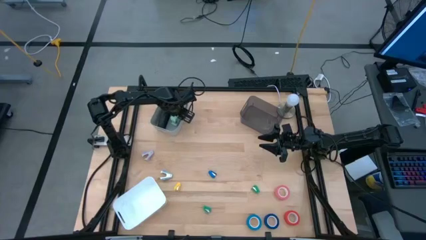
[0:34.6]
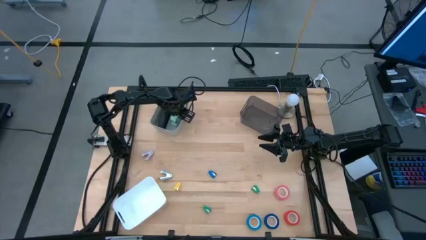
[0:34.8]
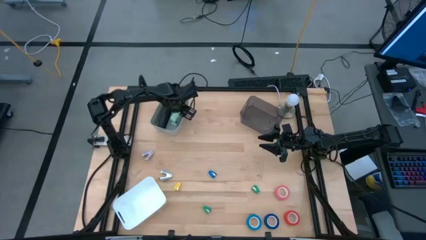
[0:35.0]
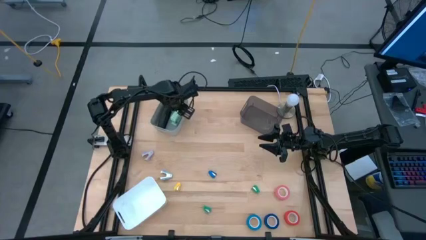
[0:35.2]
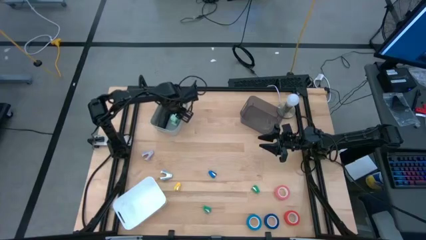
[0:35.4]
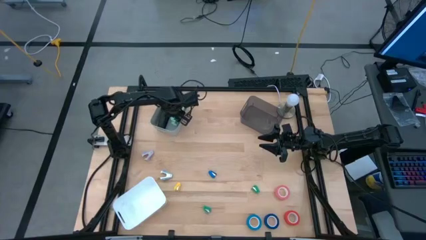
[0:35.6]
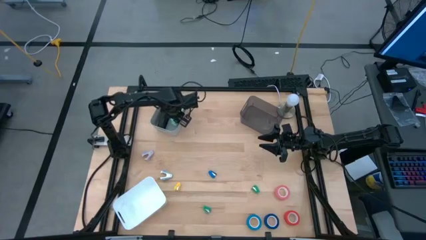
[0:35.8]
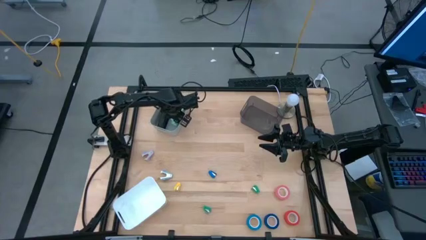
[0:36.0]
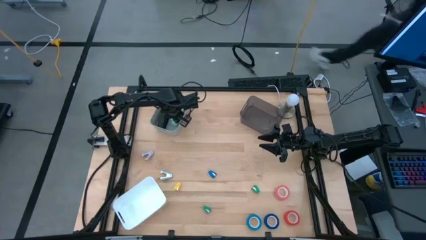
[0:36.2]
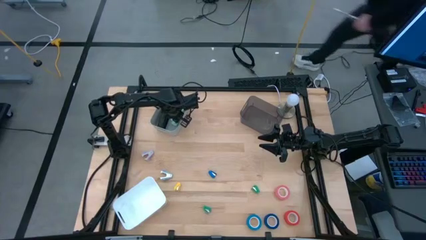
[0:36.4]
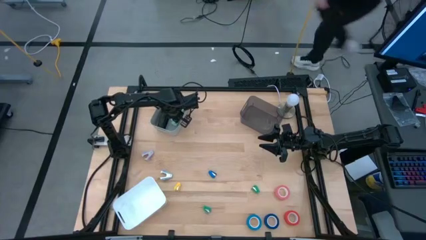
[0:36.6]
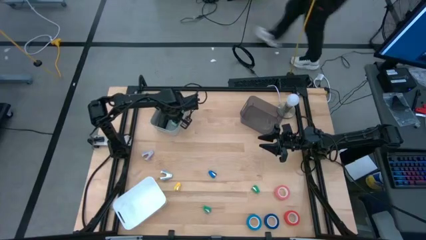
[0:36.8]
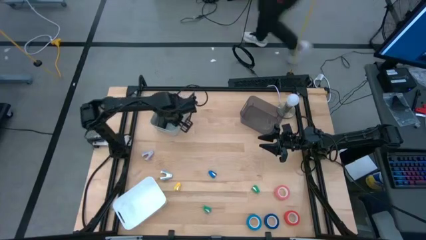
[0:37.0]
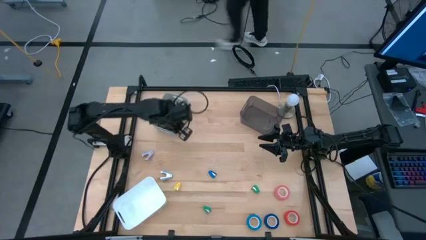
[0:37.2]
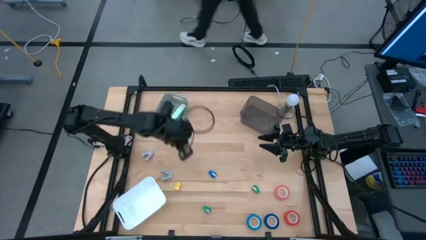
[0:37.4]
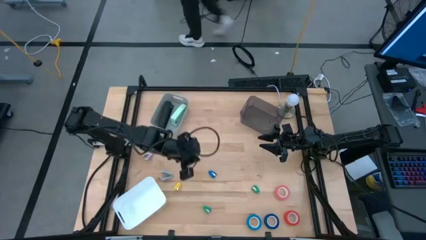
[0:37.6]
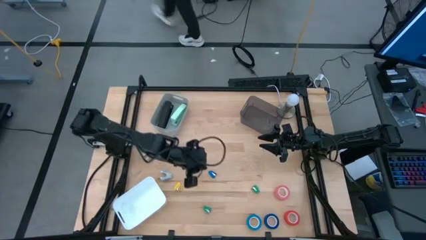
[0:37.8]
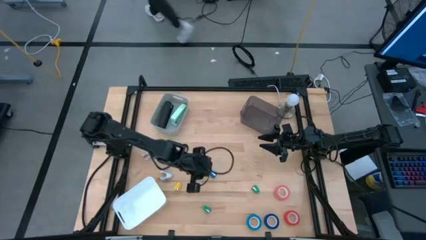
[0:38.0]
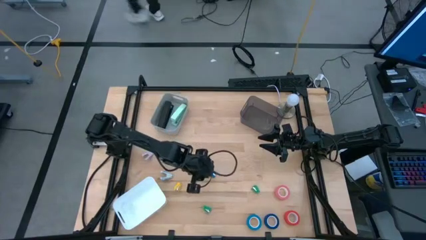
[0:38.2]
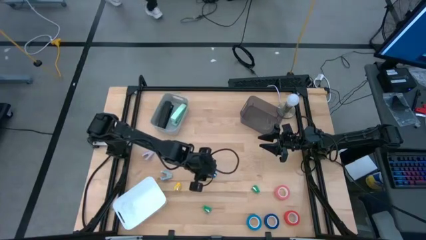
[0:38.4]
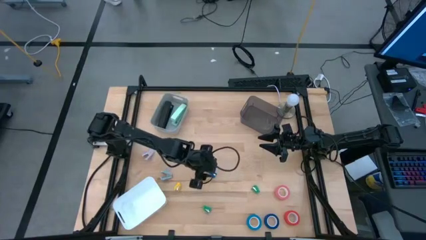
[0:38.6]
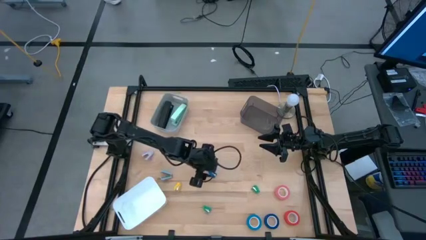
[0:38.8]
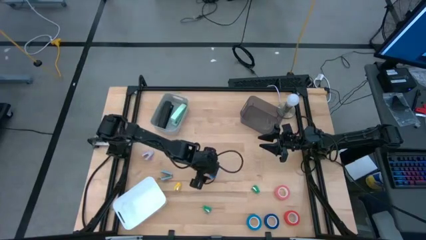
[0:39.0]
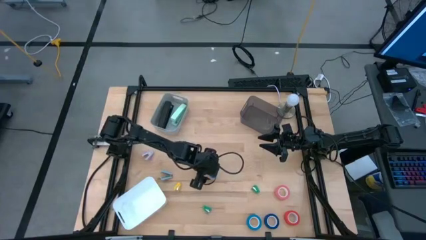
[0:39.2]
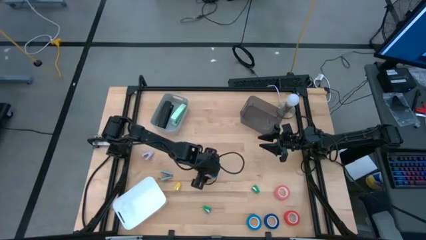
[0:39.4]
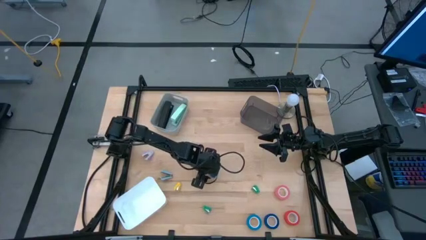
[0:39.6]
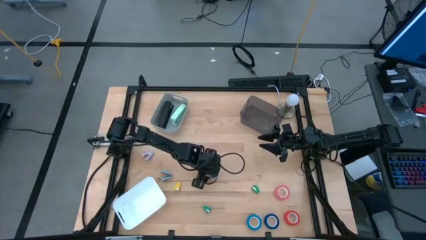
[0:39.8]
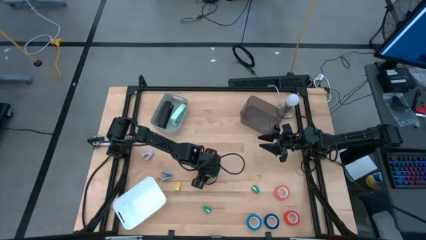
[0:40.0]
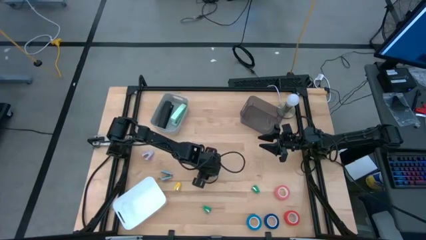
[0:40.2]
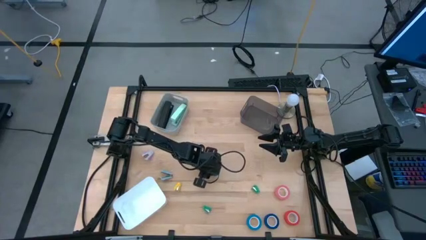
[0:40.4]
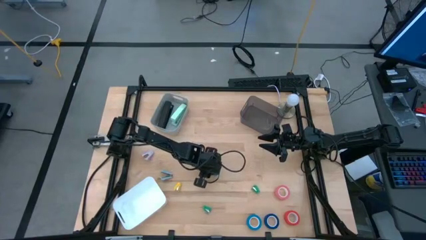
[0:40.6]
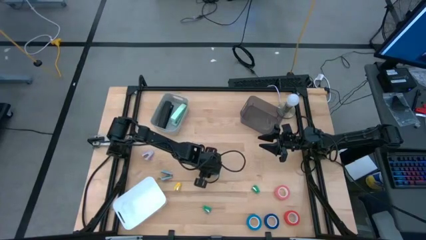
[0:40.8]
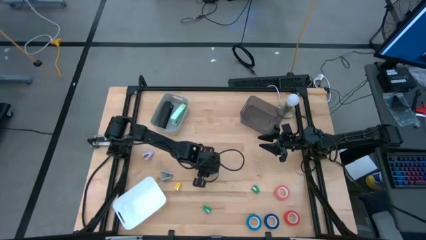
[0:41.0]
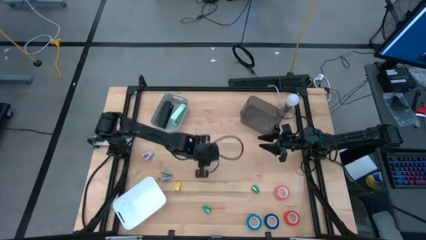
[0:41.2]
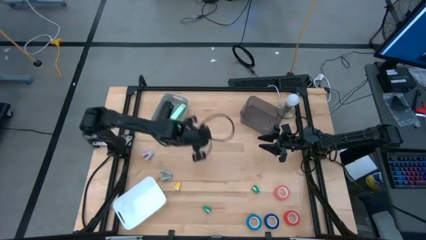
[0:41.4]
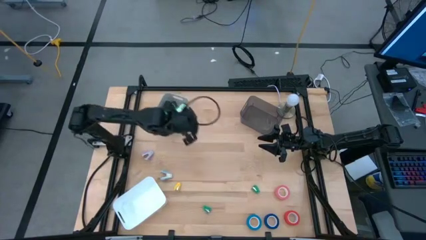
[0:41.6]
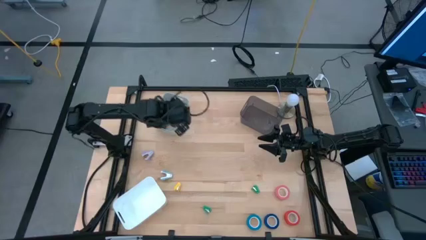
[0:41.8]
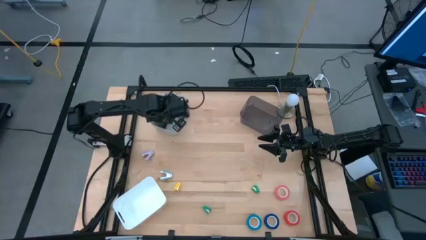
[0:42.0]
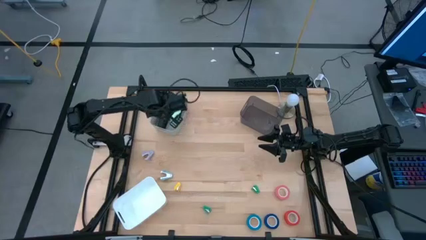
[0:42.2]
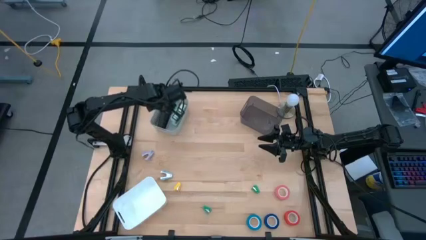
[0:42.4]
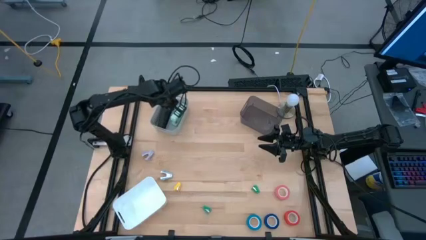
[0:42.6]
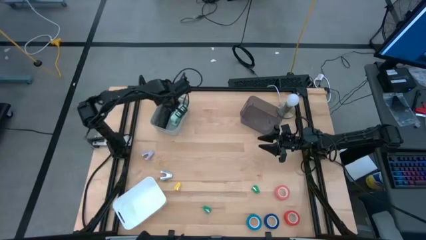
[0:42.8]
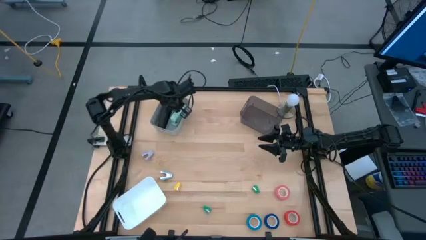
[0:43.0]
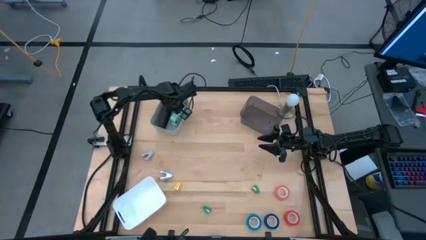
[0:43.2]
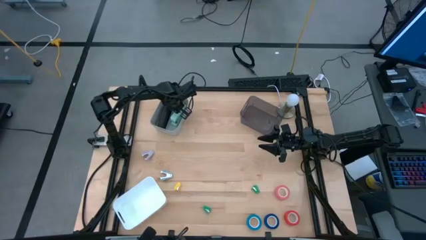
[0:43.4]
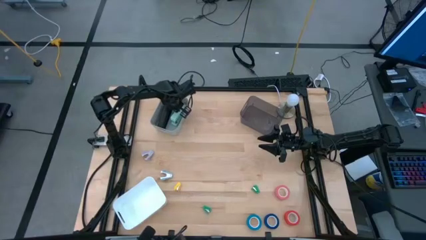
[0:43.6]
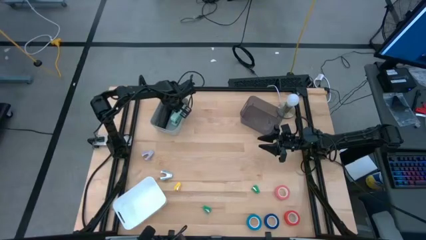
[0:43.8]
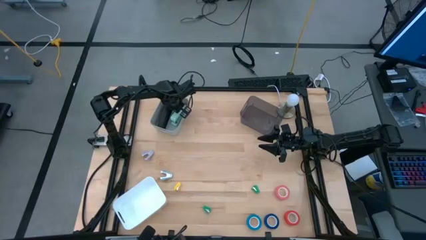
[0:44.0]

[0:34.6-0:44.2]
Task: Pick and place Stapler, Stapler remover, tape
Put the small blue stapler into the gray bin

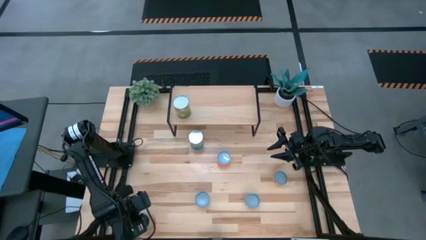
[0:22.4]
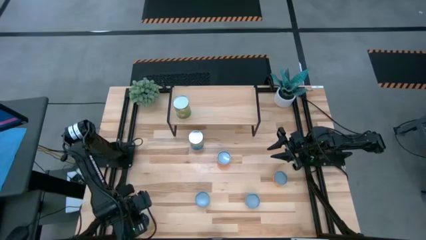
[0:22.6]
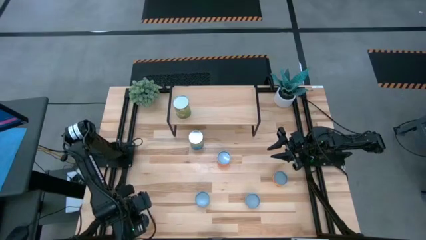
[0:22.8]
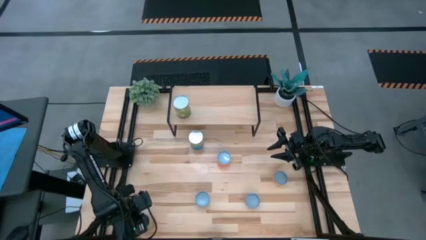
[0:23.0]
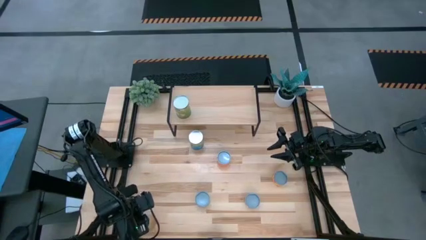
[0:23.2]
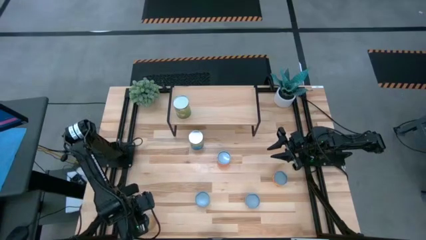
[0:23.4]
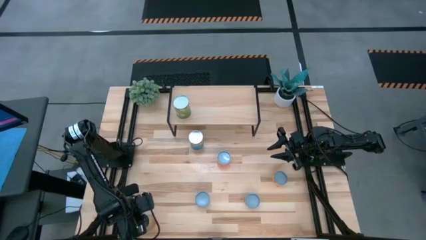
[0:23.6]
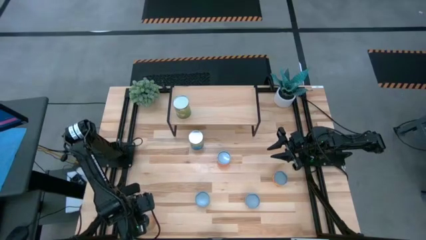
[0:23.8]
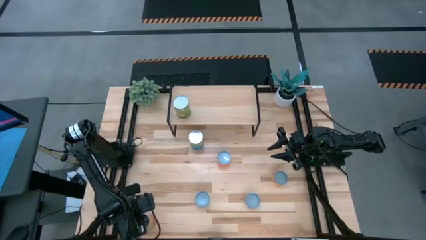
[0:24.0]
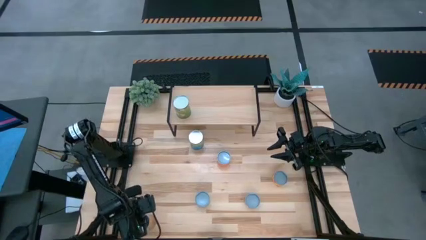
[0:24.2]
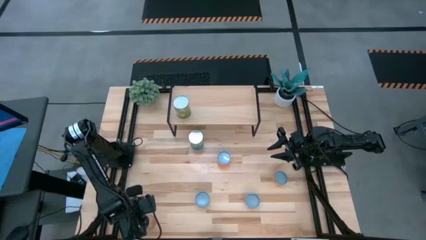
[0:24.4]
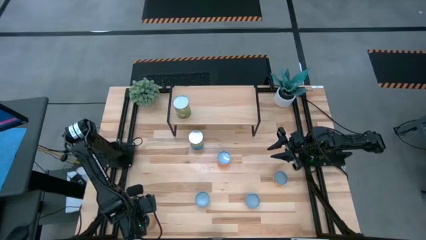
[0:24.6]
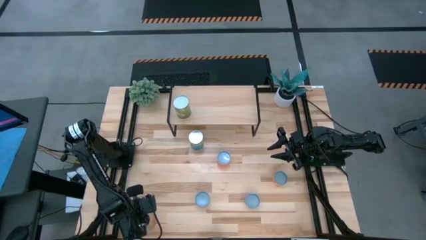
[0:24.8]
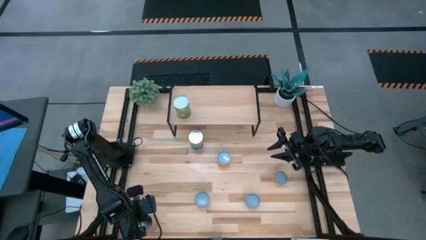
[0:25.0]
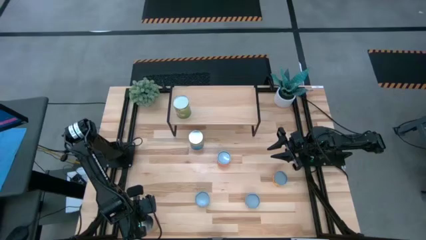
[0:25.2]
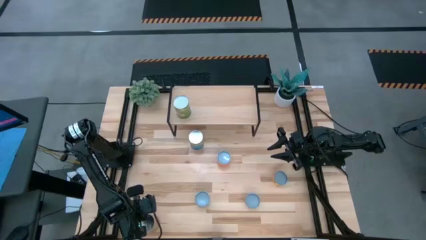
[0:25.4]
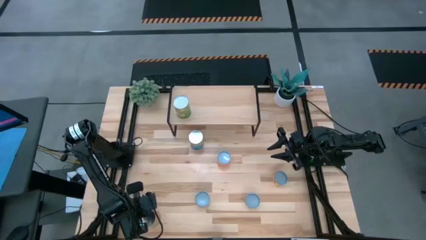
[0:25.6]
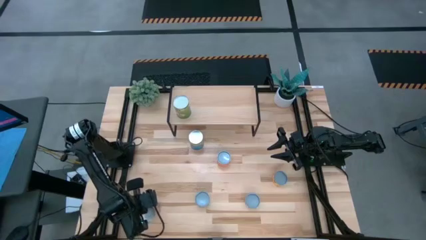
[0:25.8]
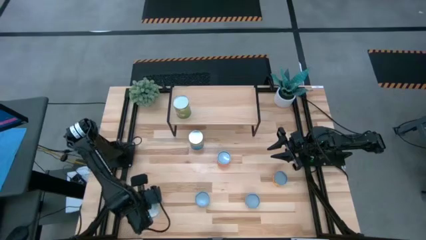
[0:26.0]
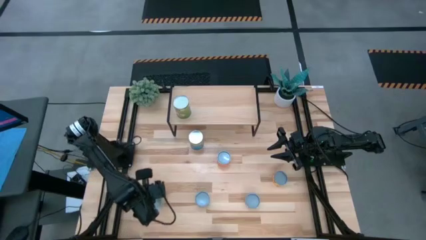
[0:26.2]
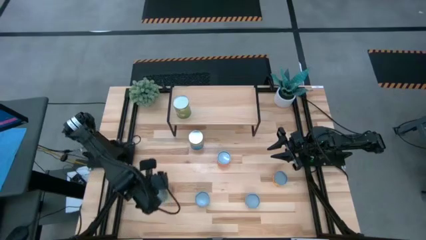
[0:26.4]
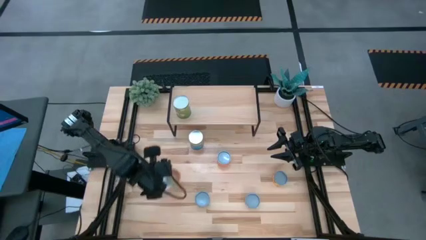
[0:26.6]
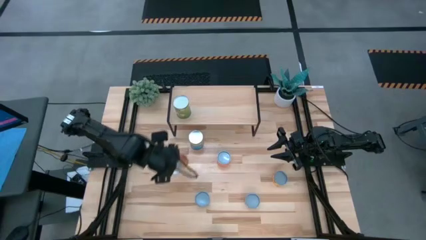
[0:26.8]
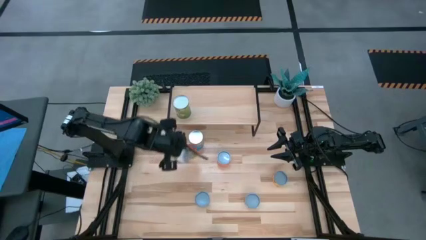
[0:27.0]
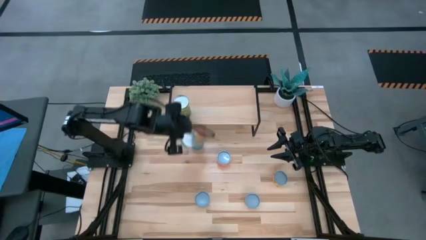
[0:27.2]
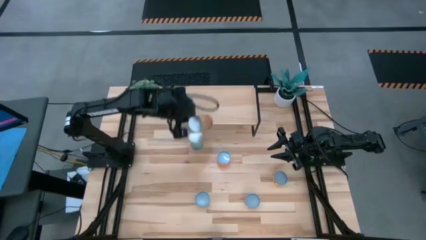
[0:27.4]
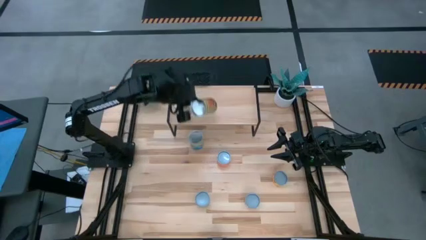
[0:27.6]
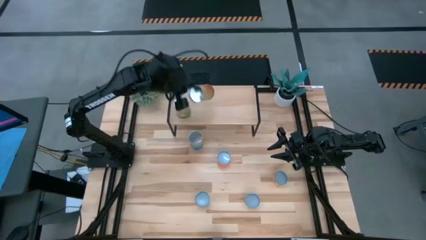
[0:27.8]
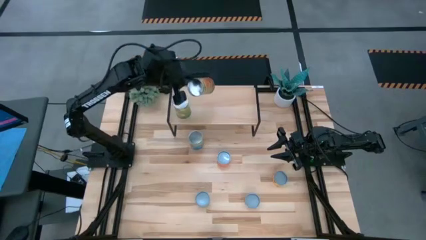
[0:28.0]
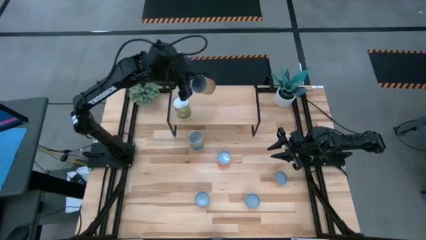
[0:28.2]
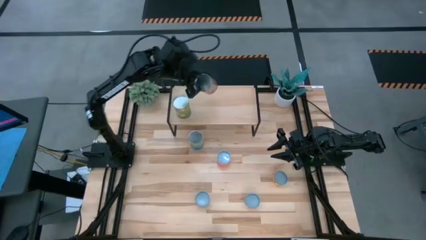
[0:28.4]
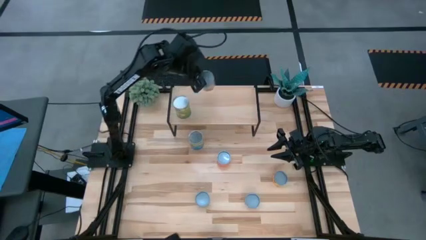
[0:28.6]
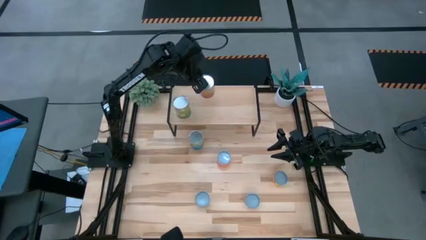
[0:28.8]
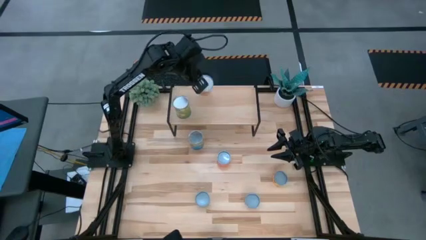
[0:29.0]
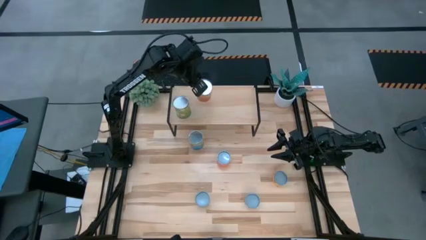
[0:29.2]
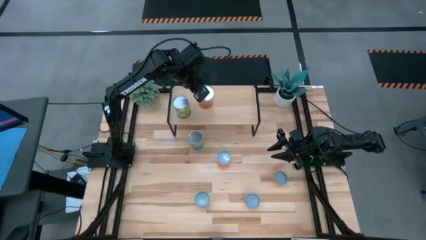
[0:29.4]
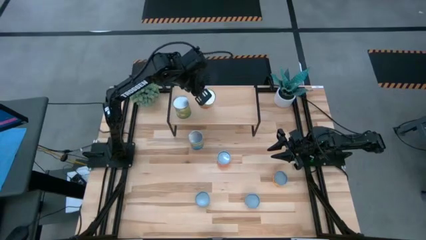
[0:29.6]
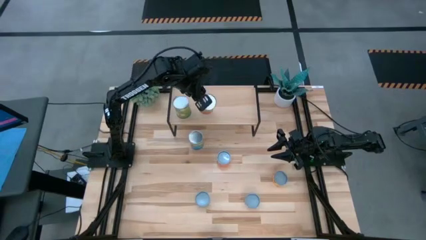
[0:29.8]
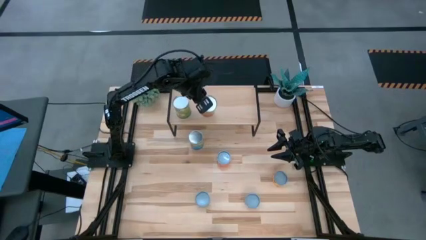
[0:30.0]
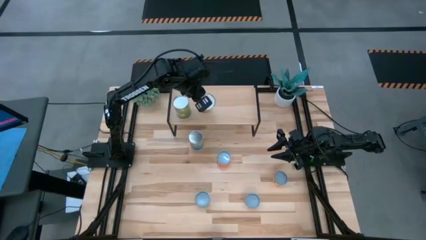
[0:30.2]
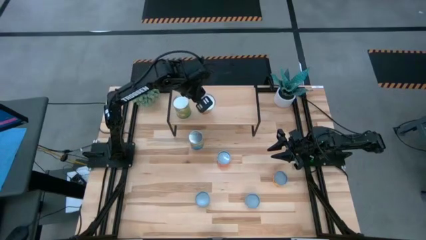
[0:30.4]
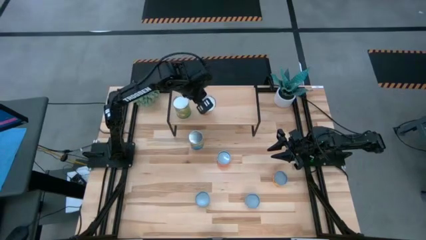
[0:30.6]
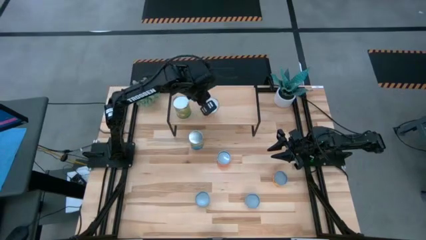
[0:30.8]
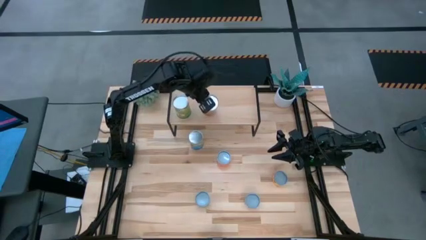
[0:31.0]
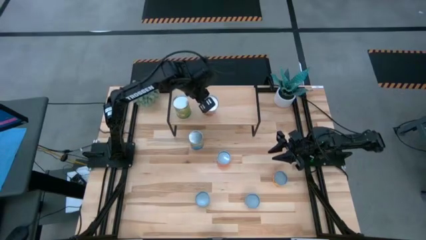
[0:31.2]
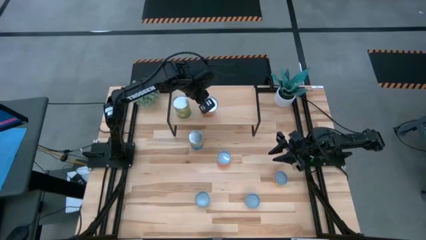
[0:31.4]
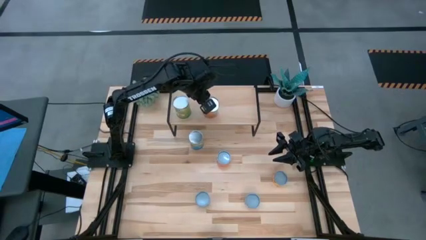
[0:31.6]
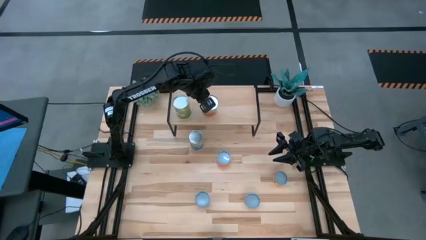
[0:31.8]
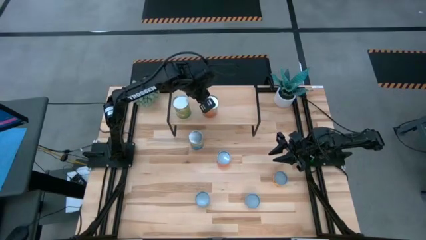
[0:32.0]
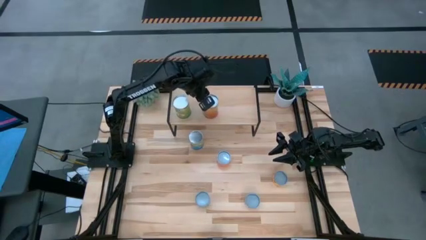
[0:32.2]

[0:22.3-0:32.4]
Task: Pick and place cans onto a shelf
Put the canned green beans on the shelf
